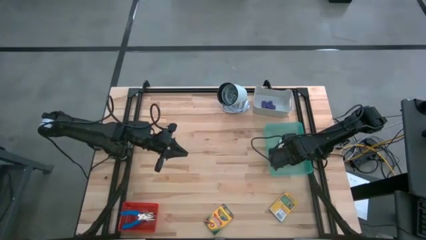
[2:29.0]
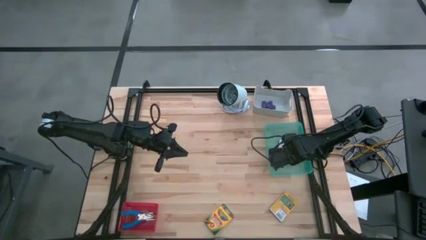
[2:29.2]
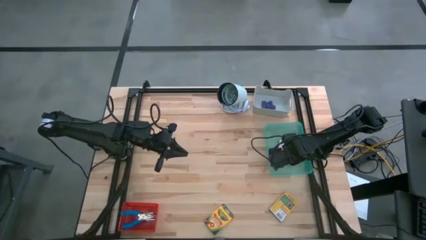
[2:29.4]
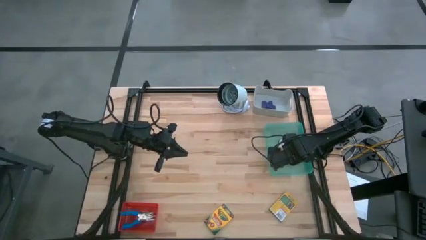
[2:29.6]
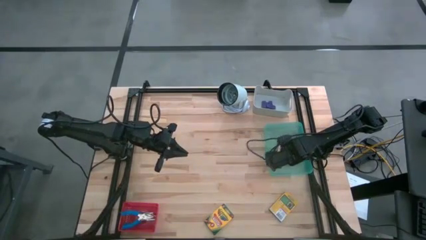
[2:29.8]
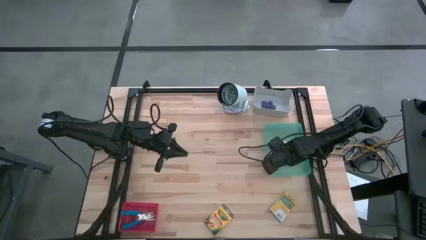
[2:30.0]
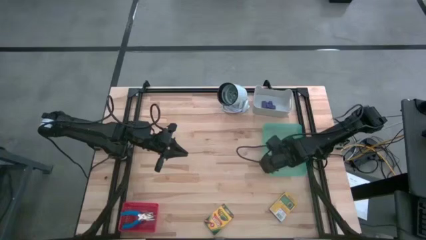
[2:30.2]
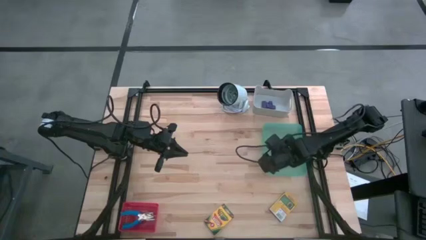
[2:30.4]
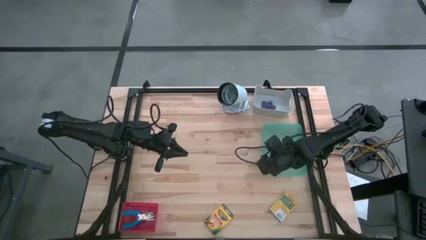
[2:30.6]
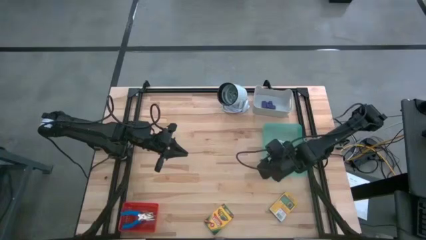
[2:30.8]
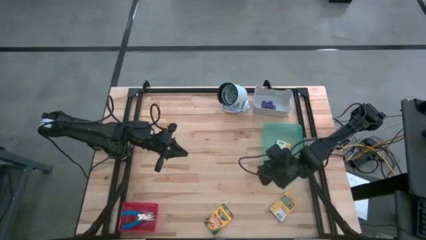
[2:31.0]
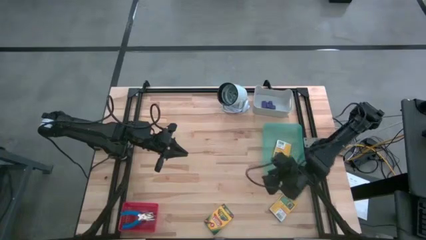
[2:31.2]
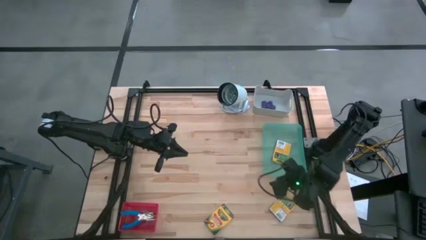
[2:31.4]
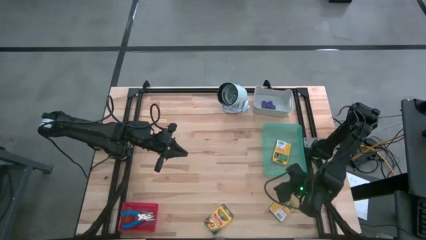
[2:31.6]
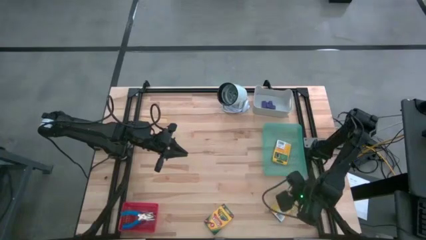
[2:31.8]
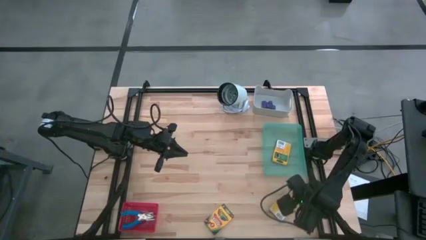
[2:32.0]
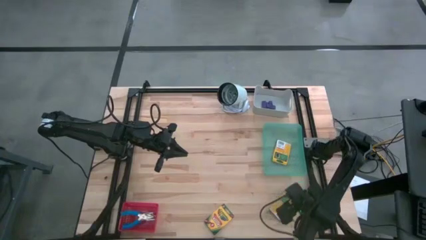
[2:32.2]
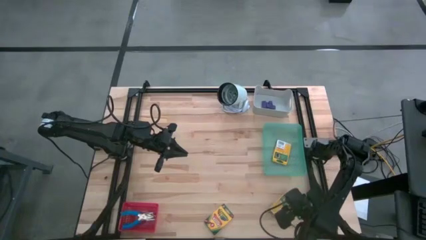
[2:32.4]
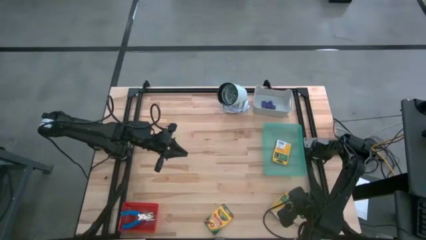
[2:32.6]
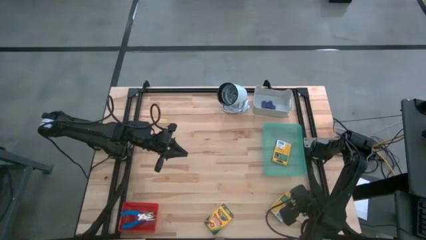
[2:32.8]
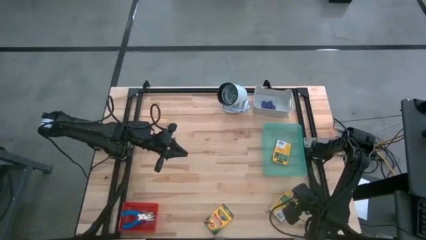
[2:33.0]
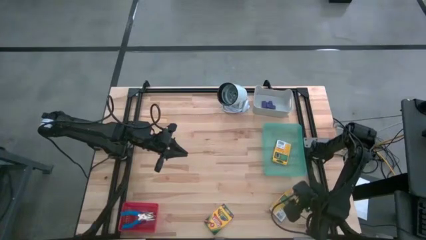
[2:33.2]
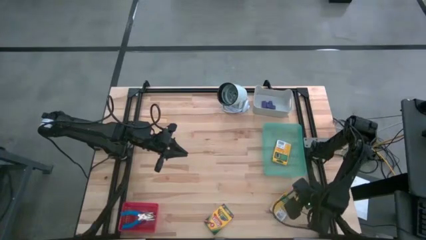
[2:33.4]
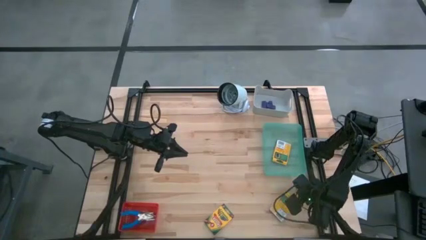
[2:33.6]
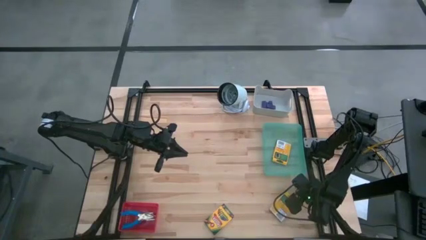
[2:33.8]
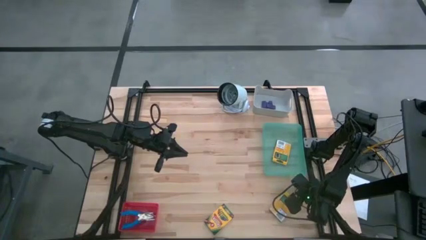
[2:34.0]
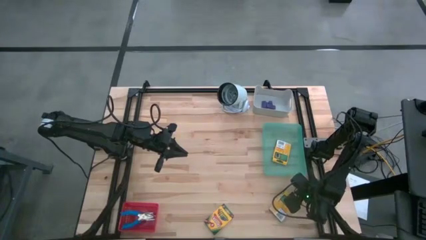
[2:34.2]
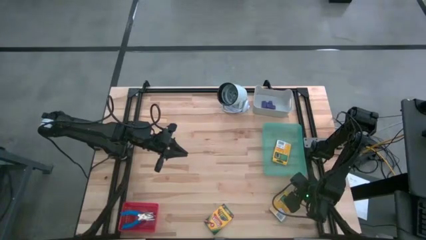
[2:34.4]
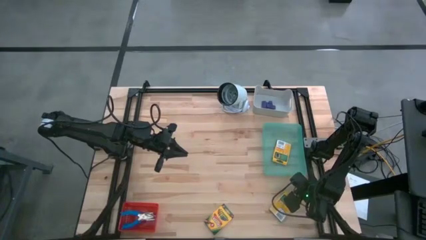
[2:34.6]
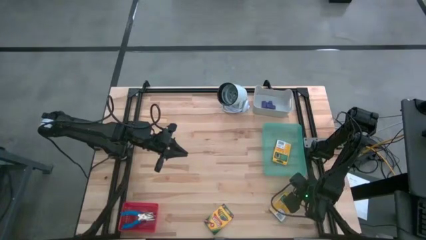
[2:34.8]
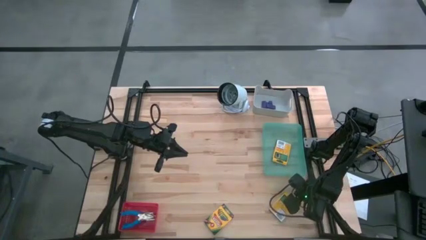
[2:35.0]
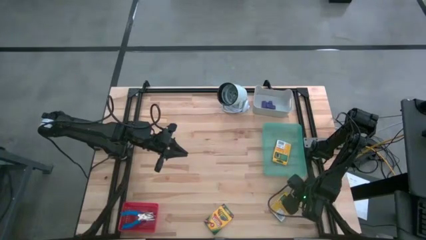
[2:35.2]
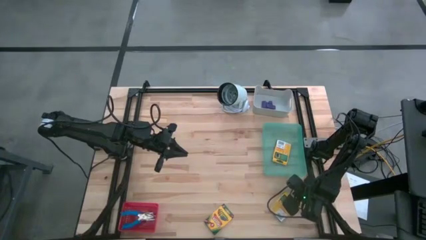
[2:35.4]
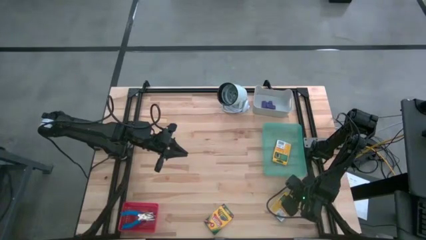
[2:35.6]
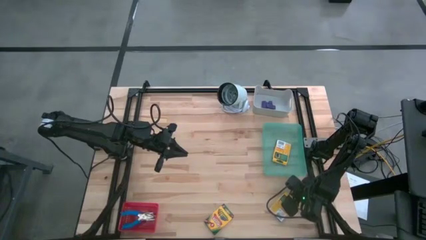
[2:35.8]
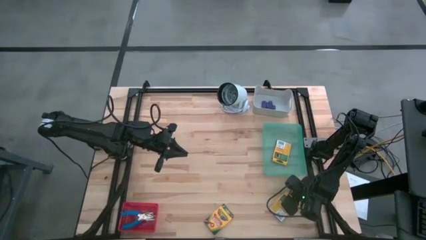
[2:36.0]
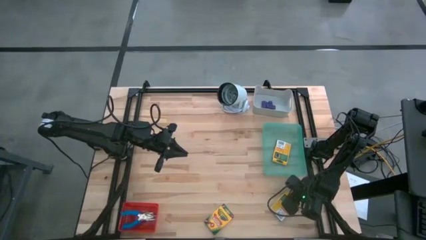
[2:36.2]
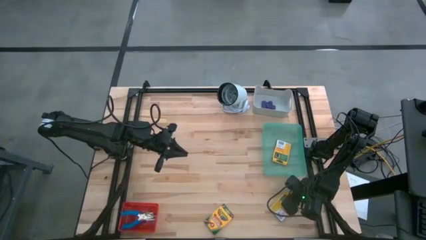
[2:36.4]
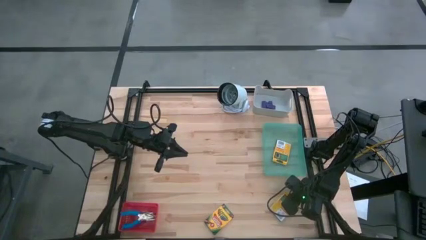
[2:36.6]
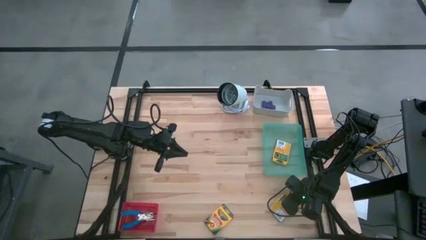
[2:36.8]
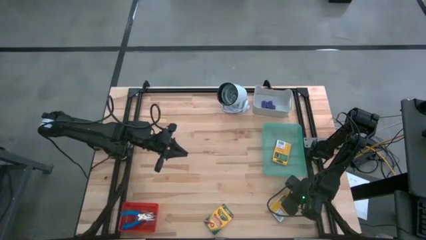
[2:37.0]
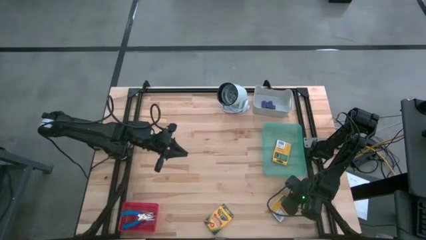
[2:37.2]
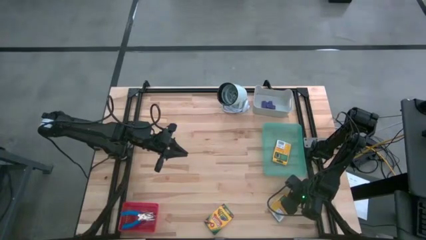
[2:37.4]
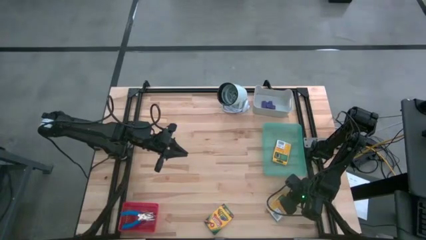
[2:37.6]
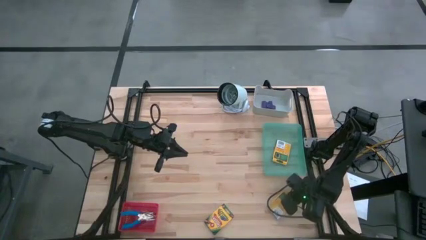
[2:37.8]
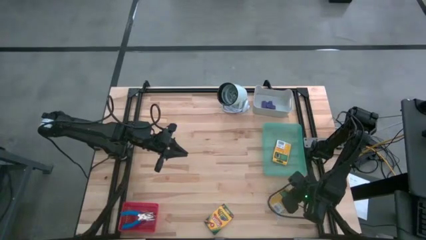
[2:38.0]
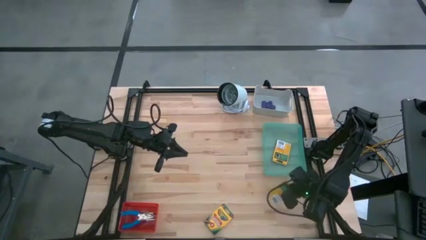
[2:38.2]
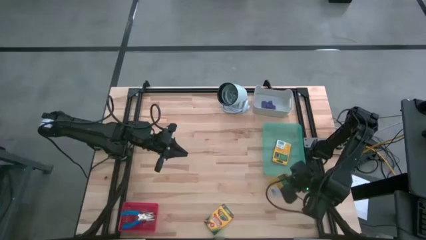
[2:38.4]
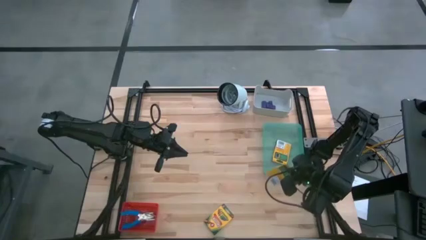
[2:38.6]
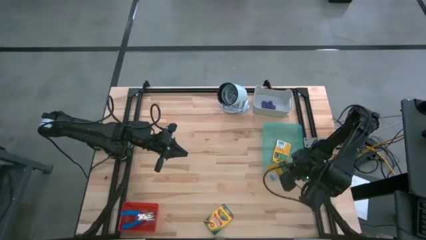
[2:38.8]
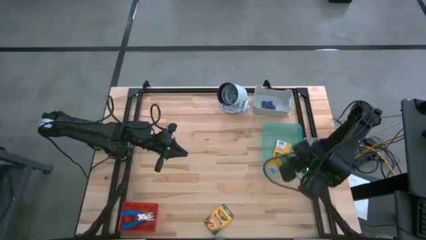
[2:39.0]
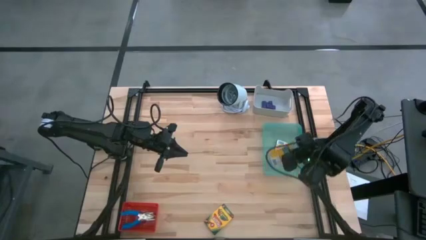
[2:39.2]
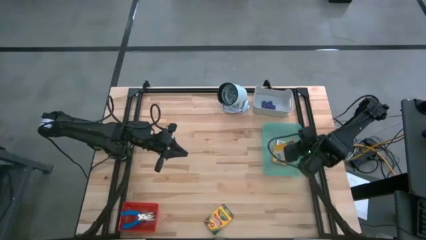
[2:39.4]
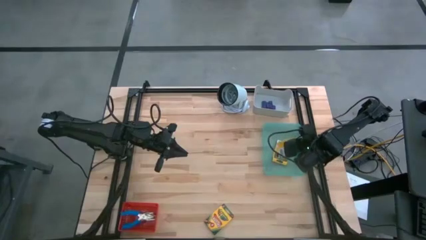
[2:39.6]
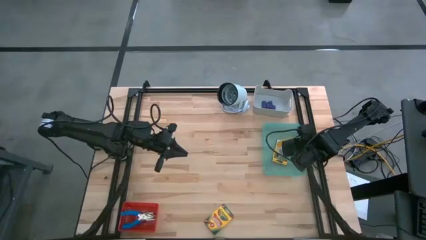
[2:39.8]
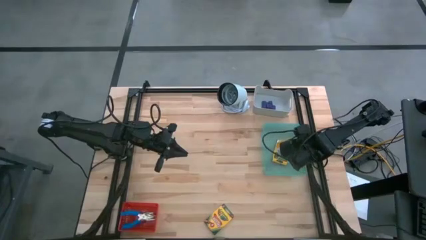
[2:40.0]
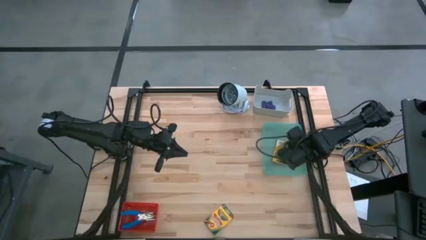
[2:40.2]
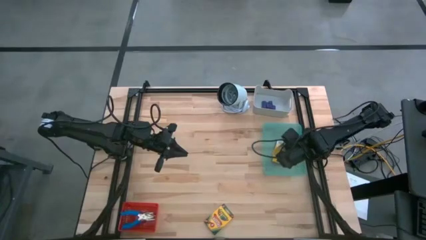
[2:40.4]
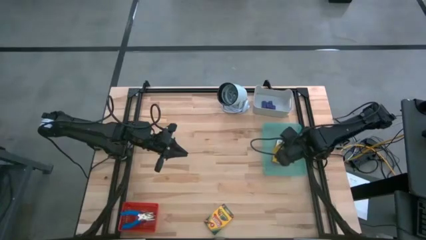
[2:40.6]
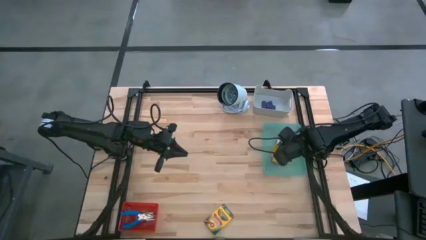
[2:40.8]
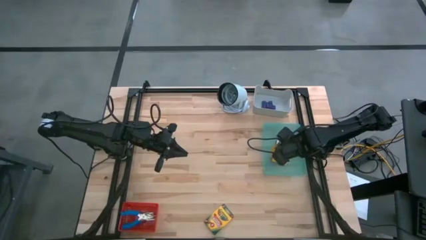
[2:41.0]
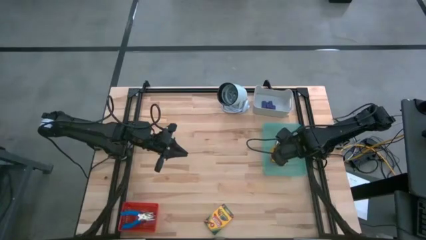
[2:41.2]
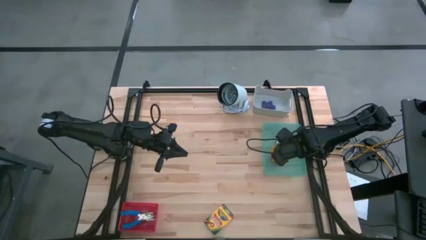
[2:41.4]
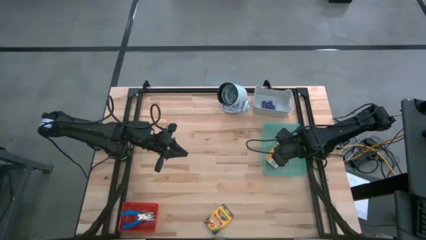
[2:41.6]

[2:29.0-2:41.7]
Task: Pick & Place School Supplies
Put the crayon box into the green bin

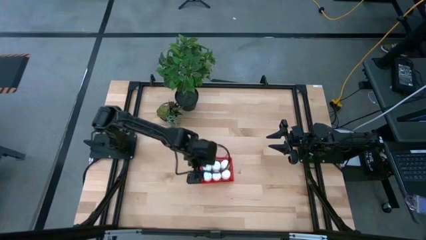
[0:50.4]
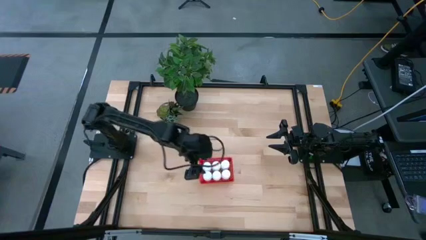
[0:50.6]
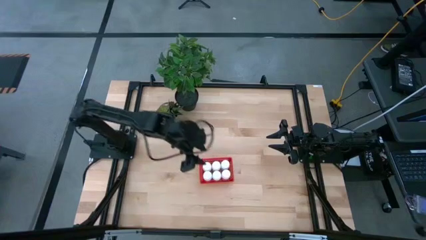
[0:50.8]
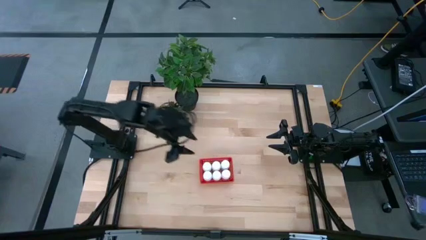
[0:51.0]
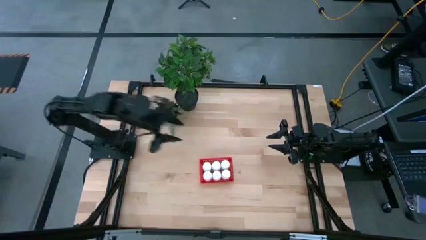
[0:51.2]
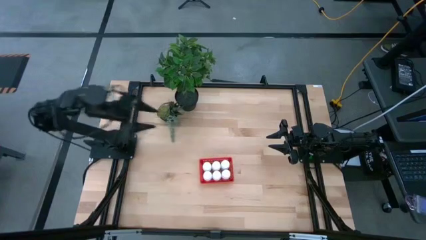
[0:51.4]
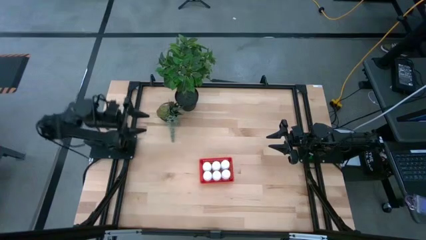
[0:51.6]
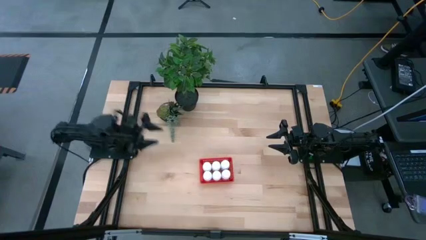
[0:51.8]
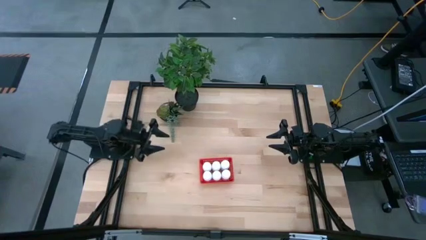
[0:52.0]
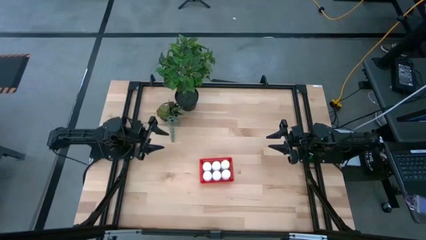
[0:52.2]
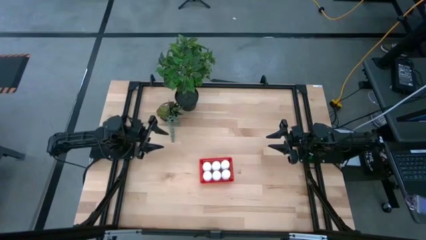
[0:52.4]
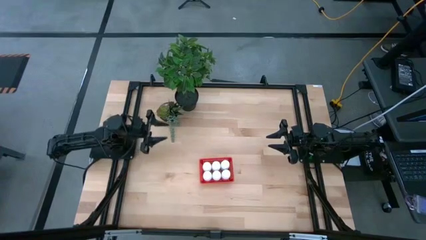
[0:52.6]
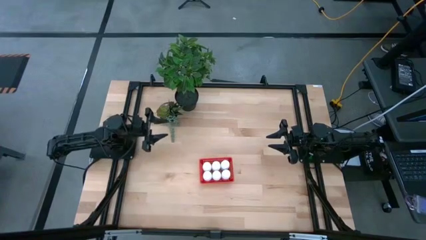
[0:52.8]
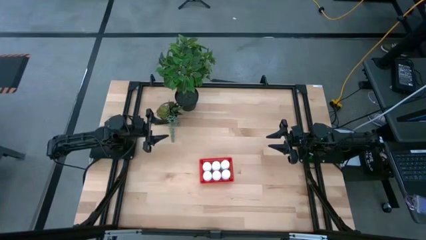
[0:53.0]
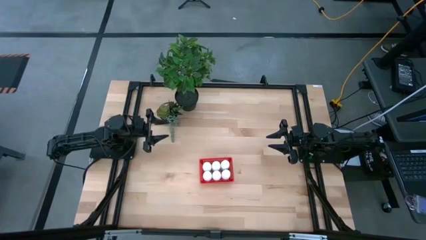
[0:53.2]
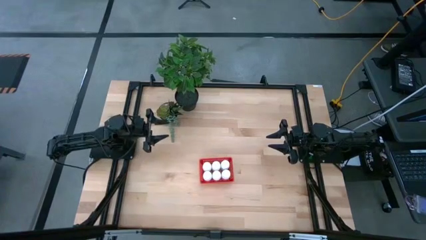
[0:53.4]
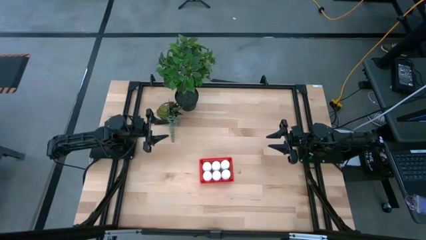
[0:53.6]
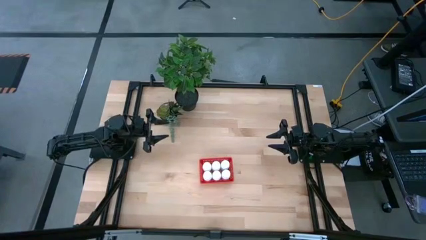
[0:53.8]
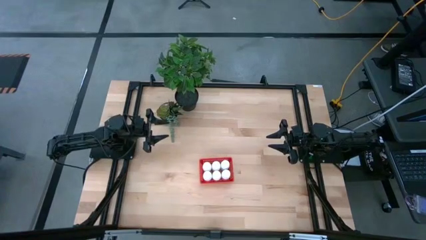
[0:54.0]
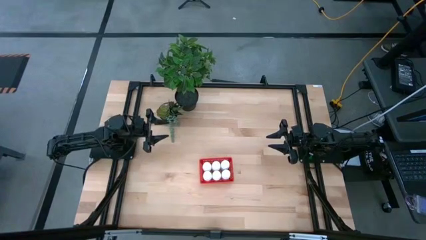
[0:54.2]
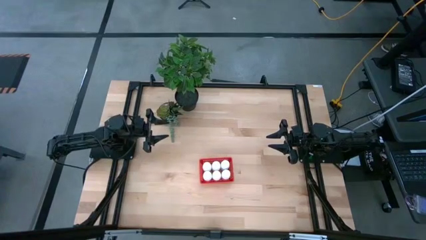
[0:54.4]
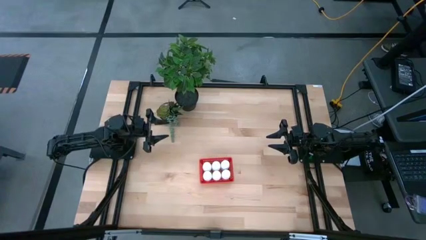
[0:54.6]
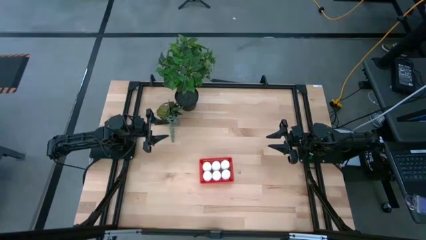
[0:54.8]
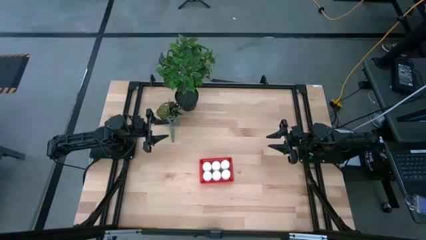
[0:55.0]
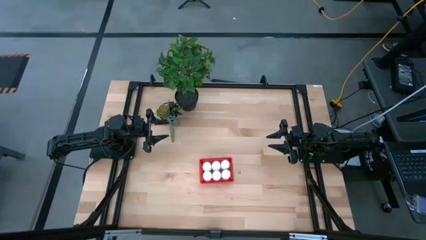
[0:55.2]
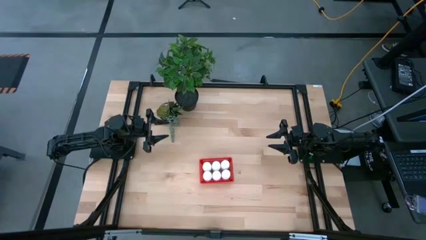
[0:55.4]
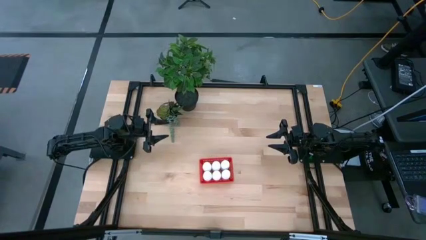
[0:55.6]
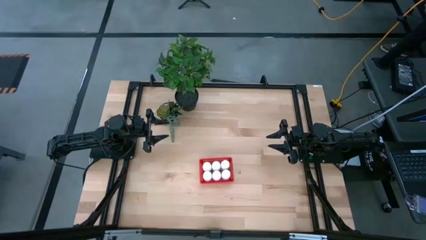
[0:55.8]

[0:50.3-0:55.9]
Task: Pick and place pill bottles into a basket
Return to Home Position
